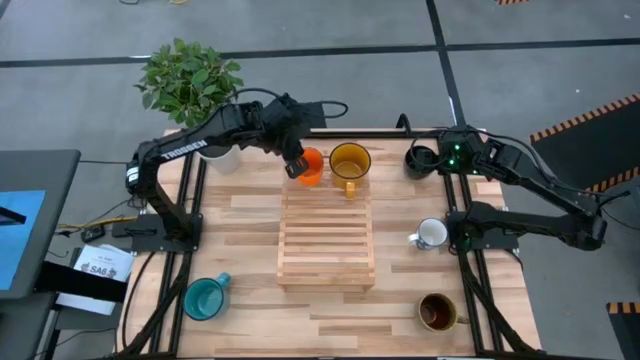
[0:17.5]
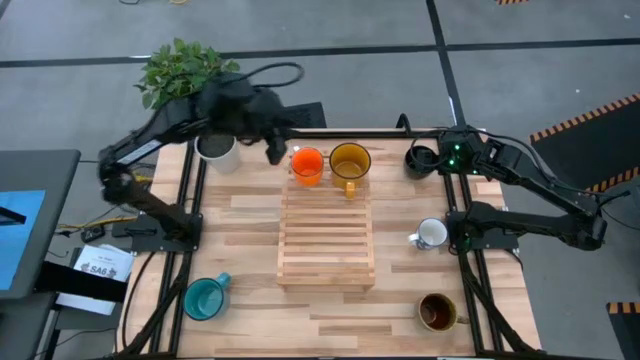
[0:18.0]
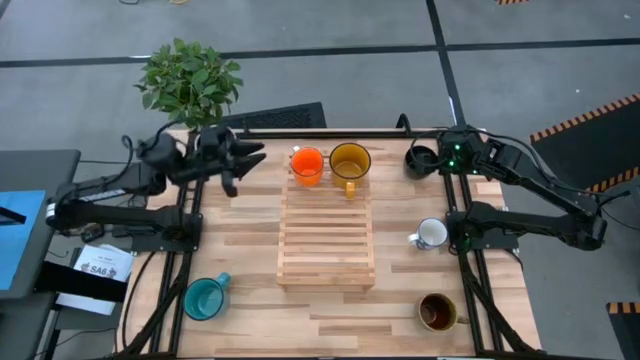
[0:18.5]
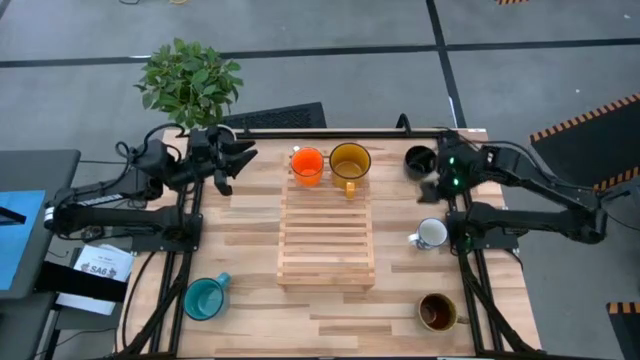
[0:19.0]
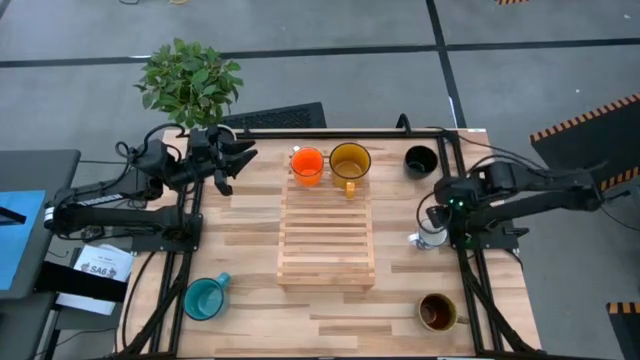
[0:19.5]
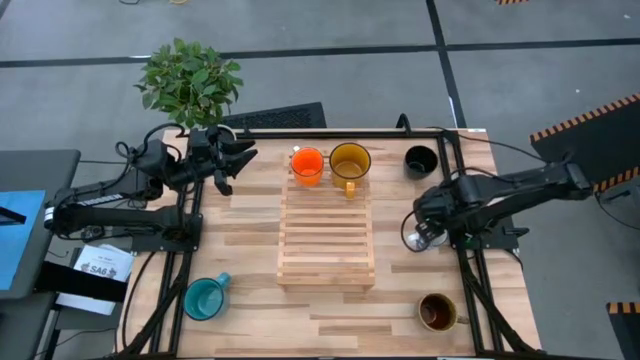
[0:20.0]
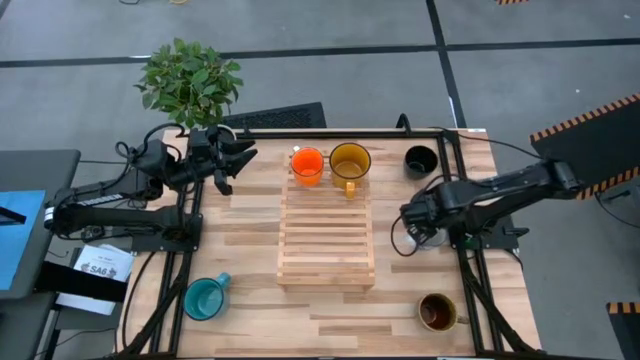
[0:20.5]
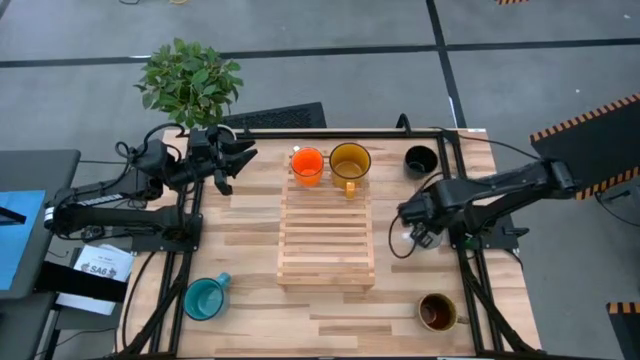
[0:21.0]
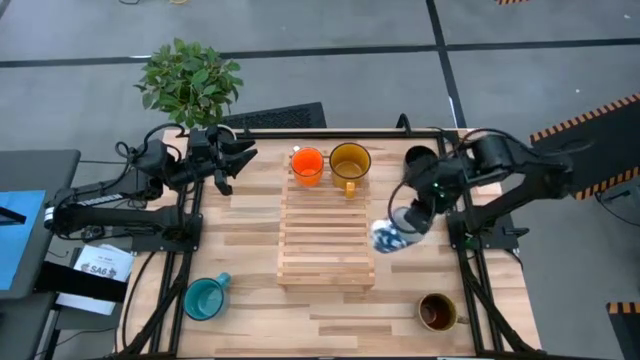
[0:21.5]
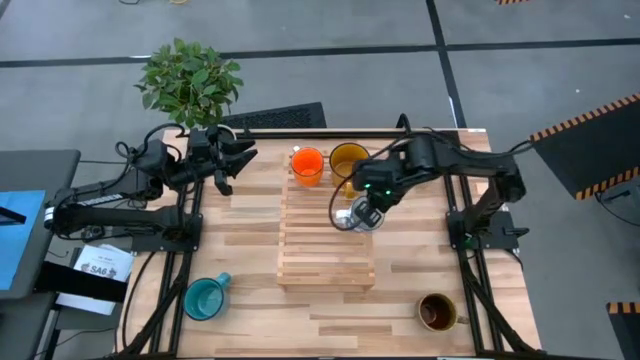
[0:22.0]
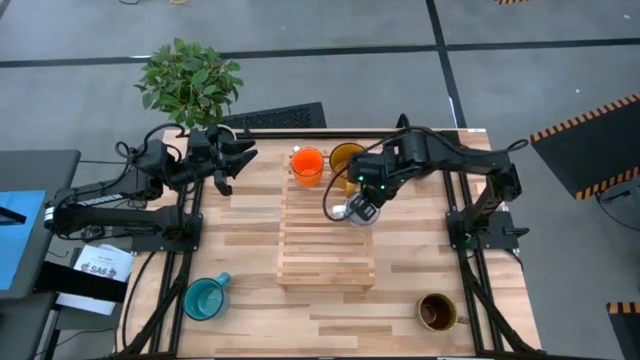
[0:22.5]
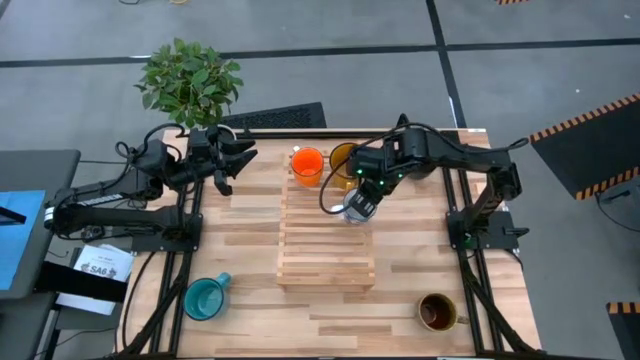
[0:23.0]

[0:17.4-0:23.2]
Task: Place coffee mugs
Put the white and blue patterned mug on the shelf

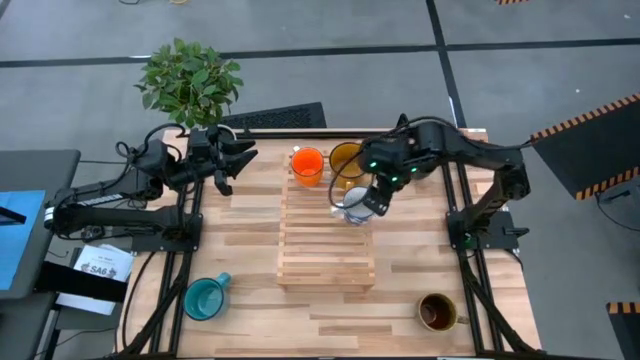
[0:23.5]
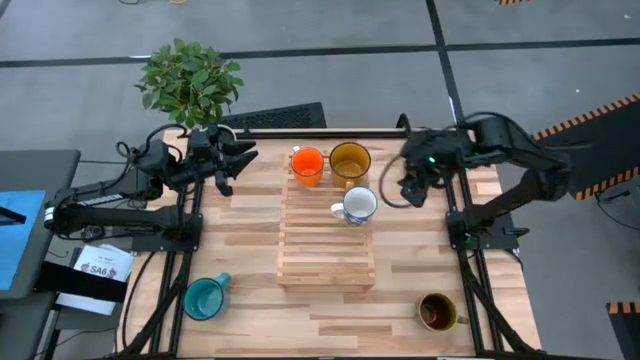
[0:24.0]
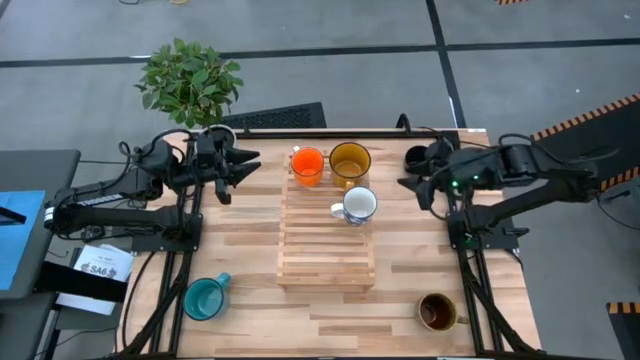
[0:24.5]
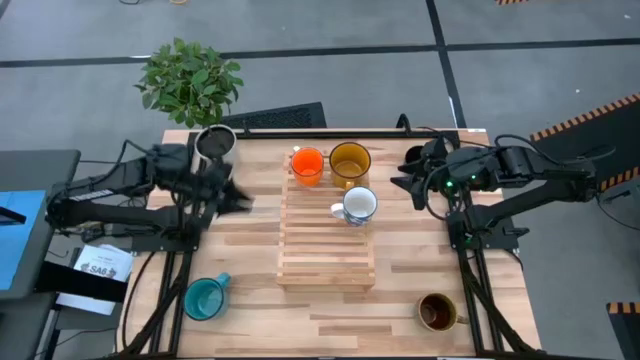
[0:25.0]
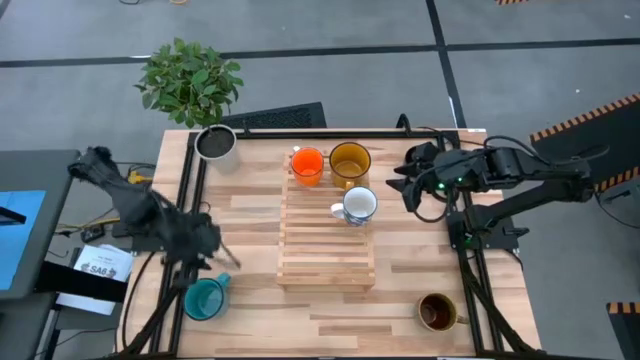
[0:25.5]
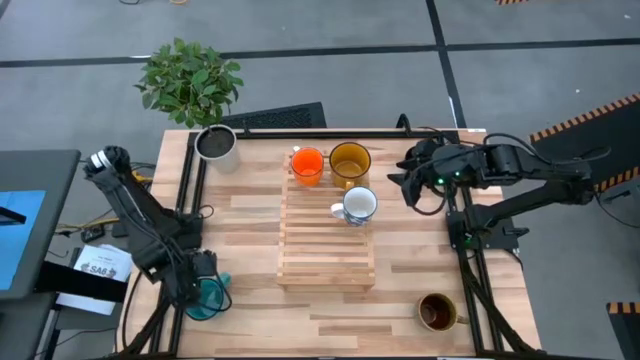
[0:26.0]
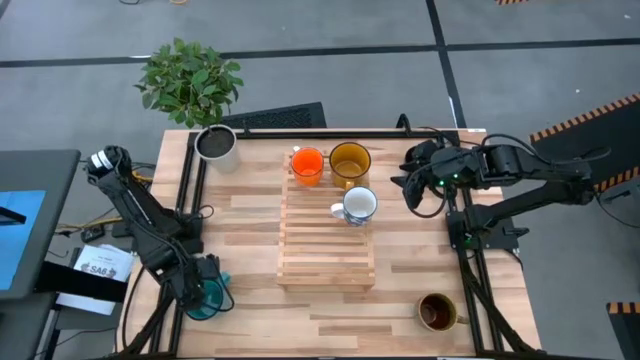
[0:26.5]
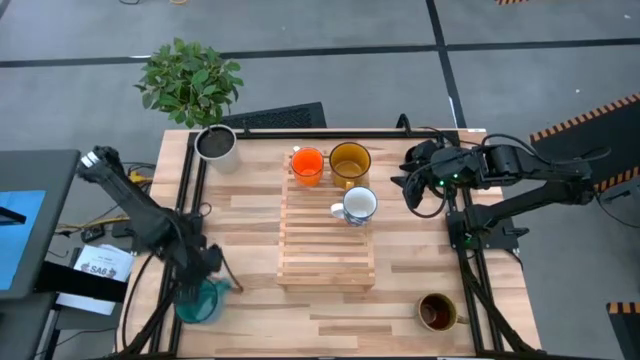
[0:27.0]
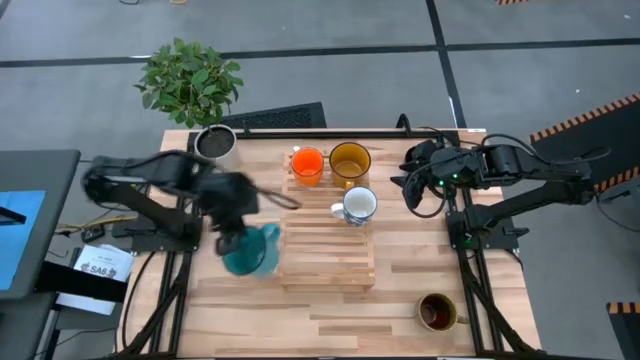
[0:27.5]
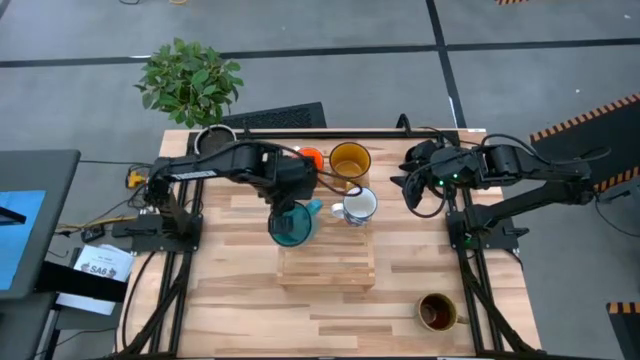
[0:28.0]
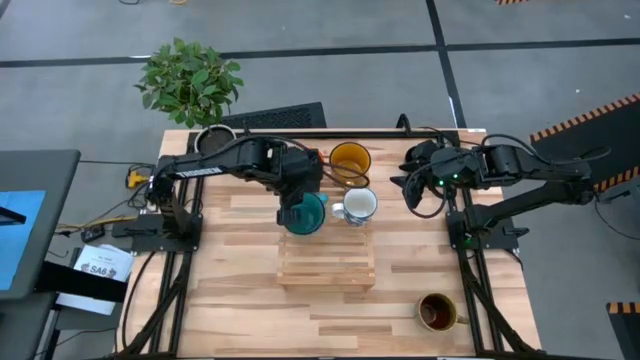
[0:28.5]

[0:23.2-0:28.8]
Put the blue mug on the shelf

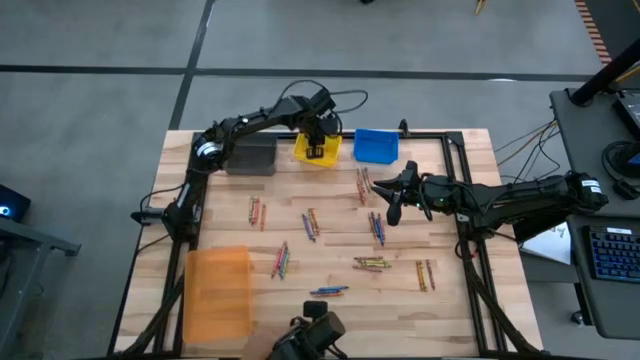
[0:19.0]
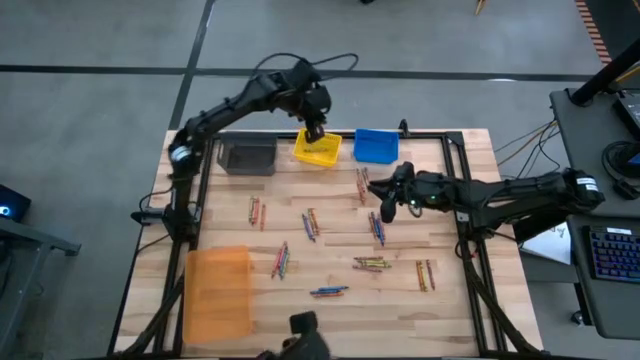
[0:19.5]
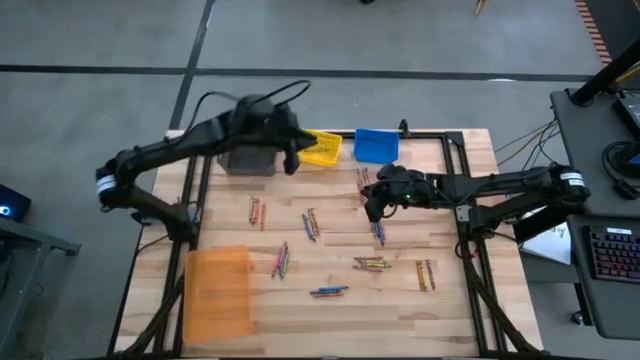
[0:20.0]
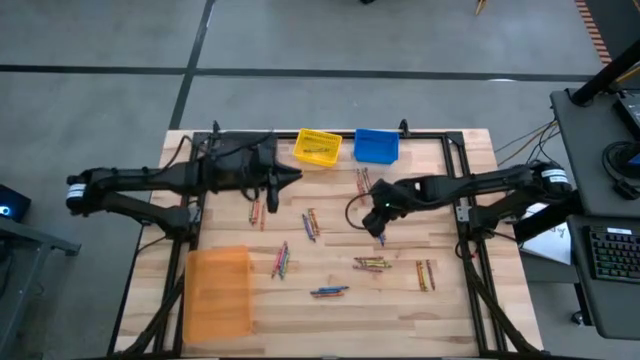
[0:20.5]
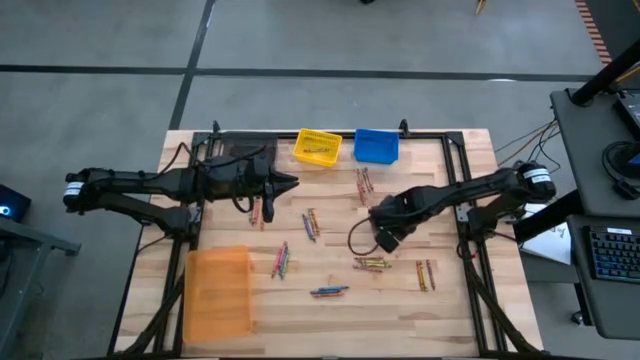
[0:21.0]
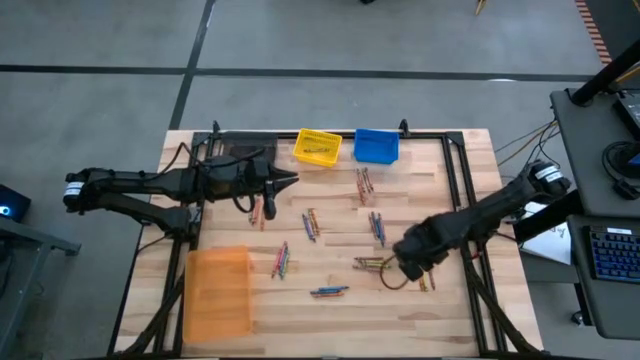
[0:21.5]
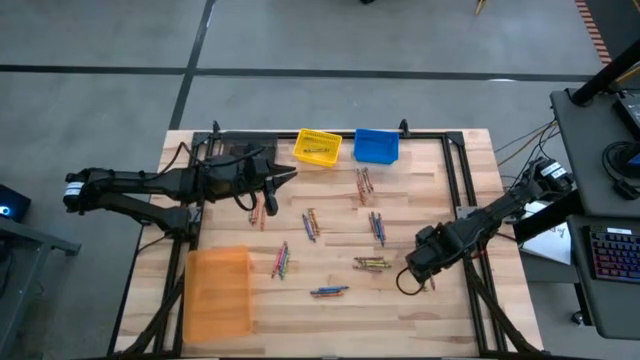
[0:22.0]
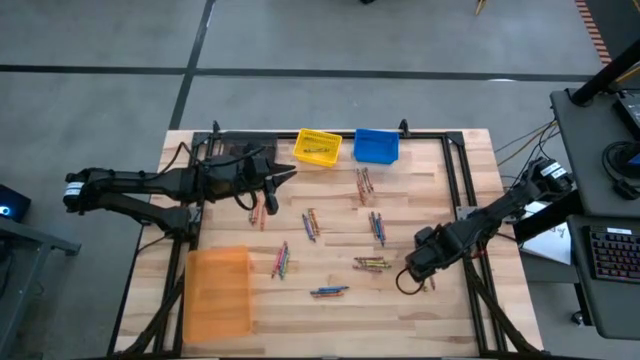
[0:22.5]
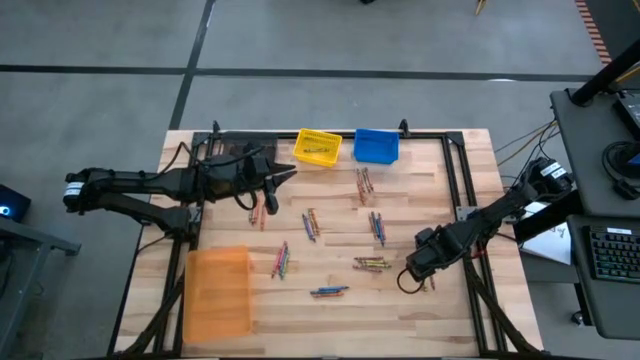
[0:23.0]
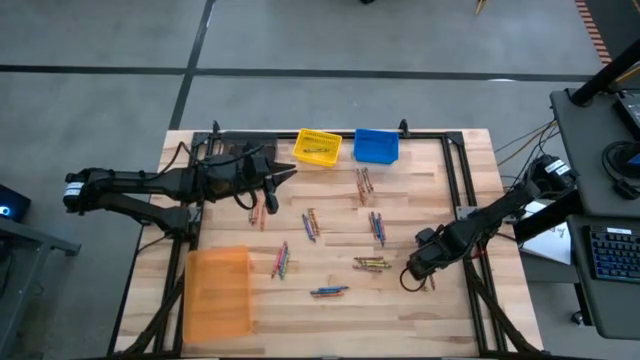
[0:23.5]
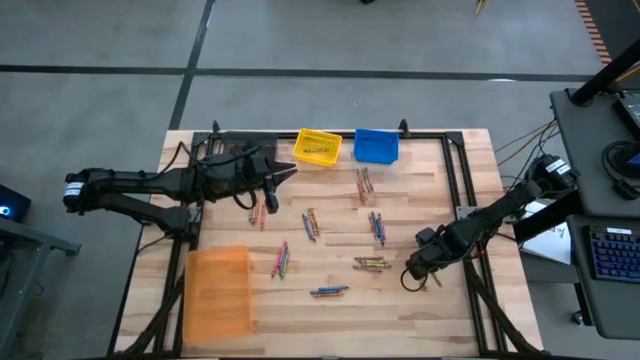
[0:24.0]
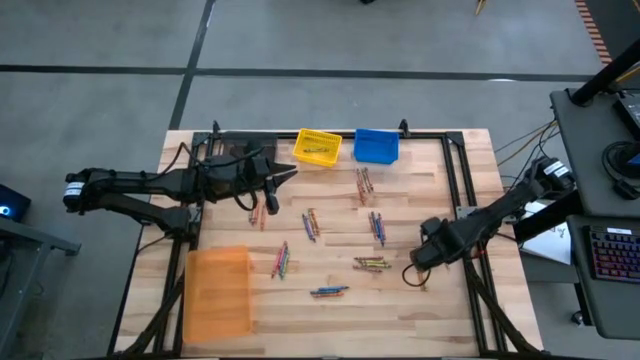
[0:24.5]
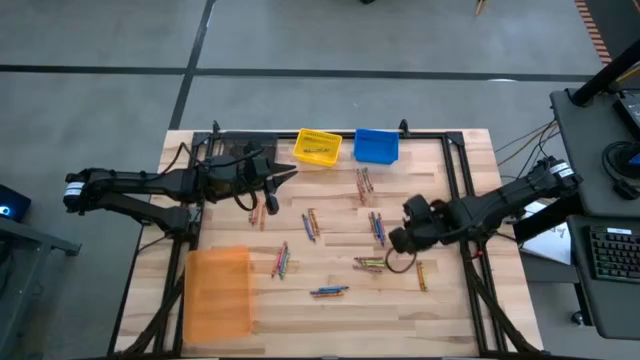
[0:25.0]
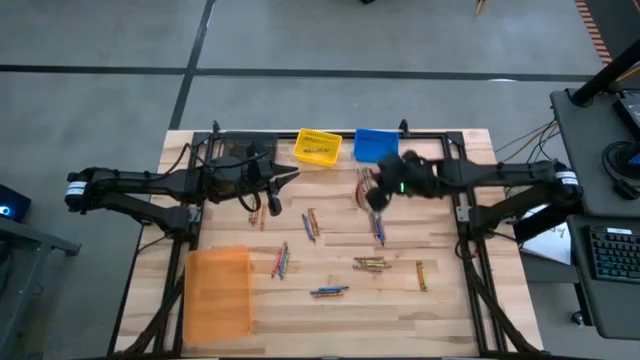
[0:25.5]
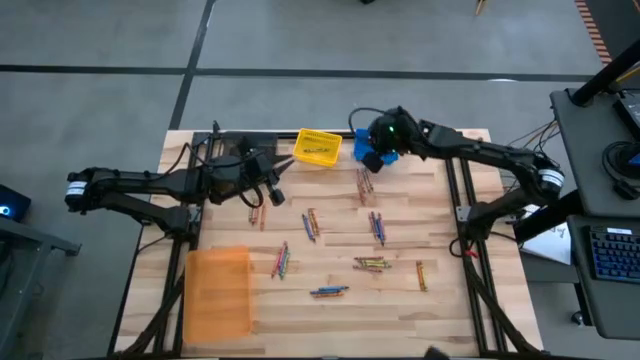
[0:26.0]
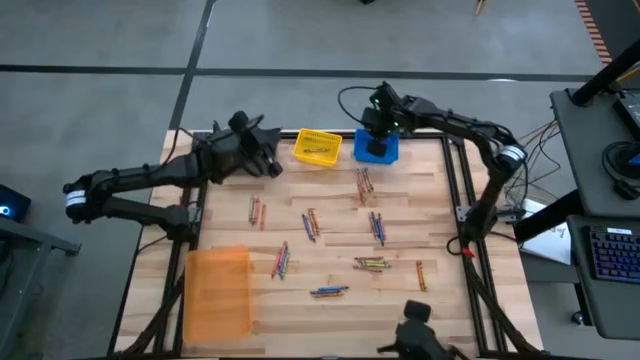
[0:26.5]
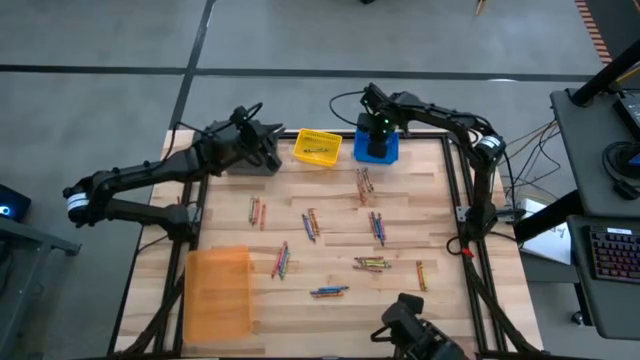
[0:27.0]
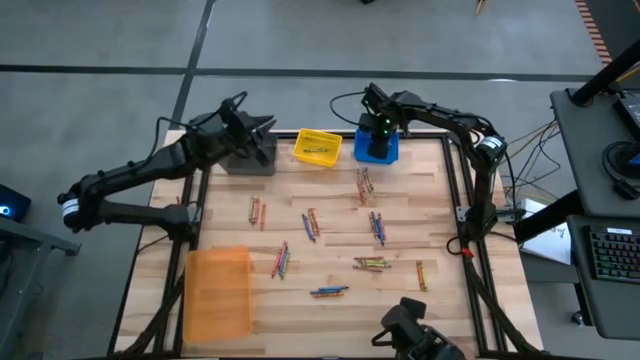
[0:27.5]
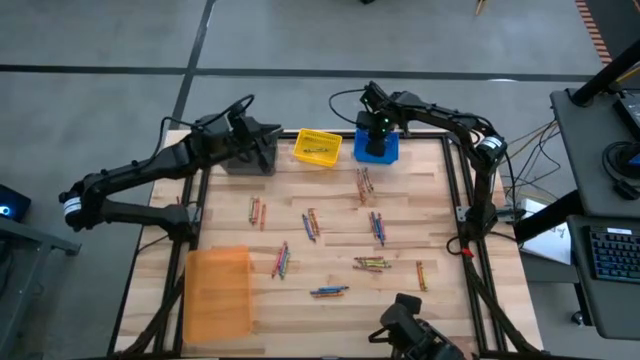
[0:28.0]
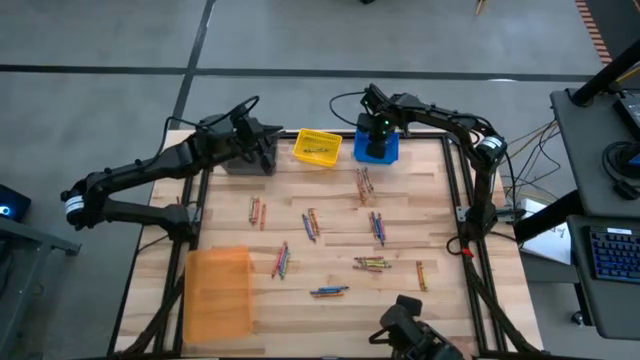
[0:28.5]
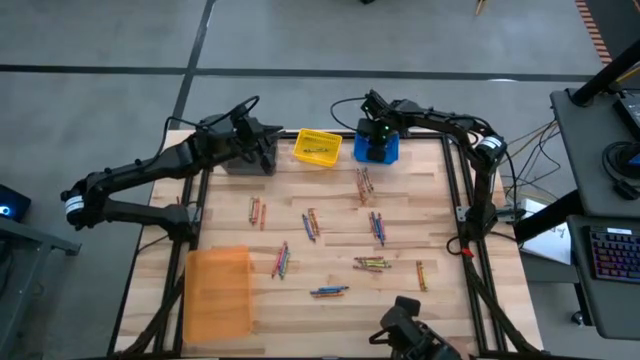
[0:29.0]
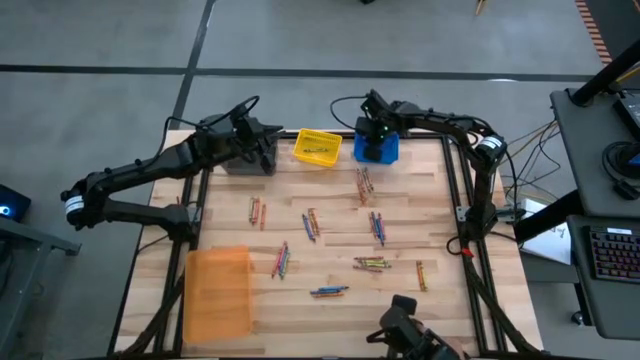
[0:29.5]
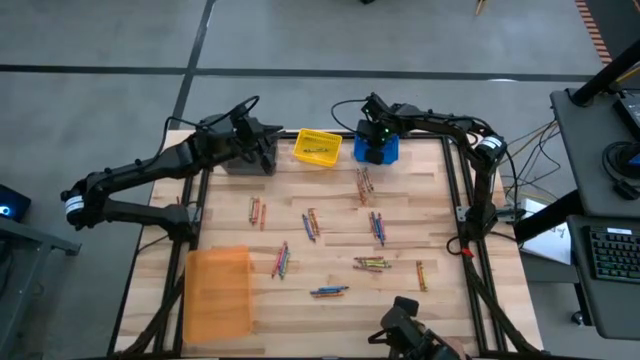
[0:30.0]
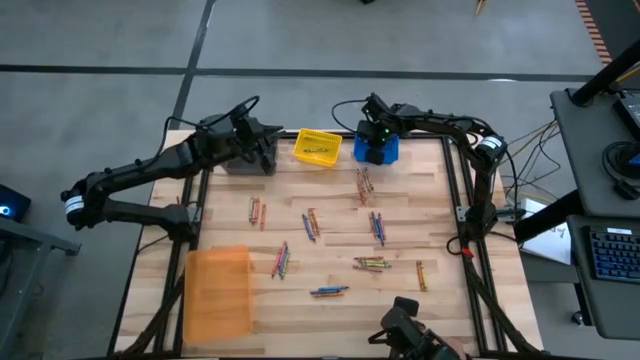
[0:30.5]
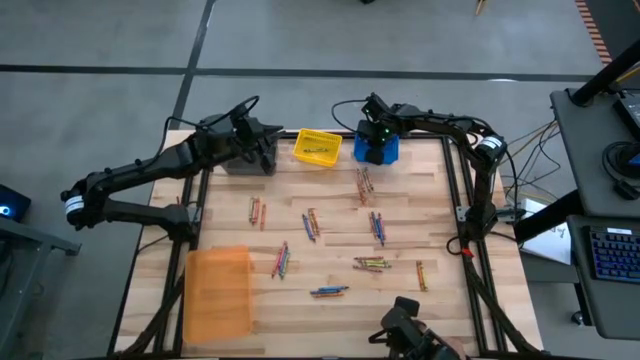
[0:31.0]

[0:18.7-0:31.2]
Task: Sort crayons
Put the red crayon into the blue bin
